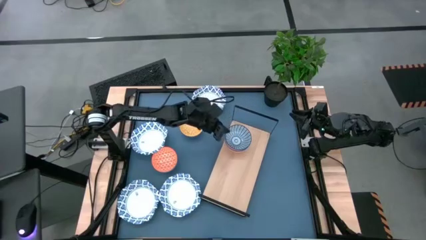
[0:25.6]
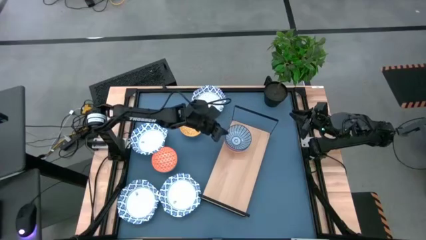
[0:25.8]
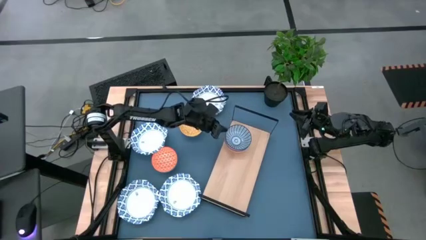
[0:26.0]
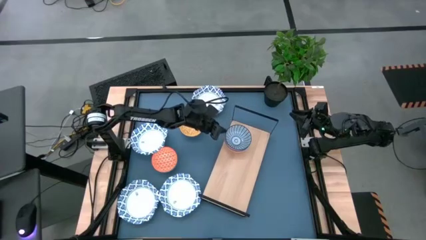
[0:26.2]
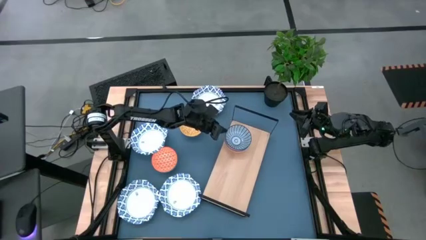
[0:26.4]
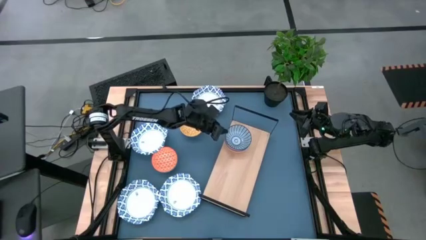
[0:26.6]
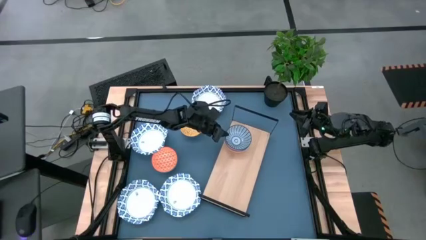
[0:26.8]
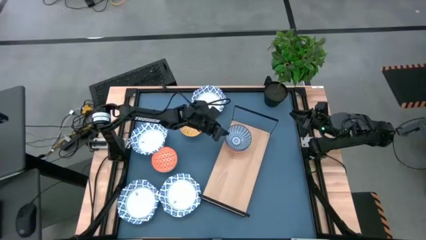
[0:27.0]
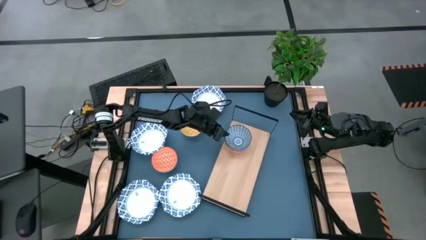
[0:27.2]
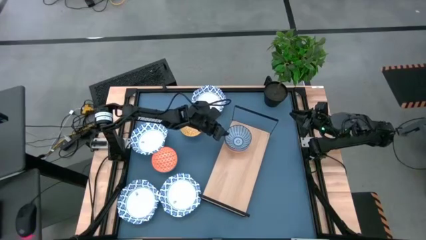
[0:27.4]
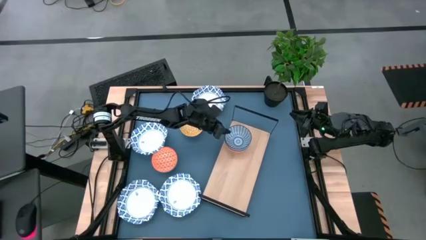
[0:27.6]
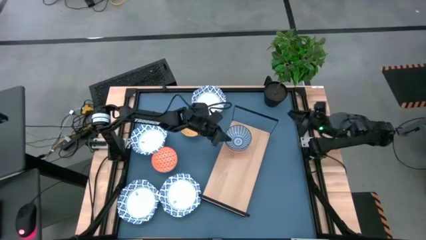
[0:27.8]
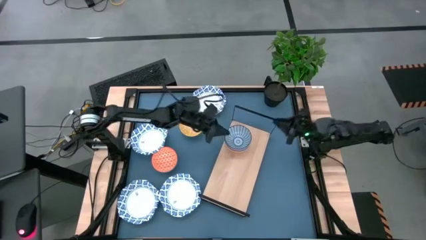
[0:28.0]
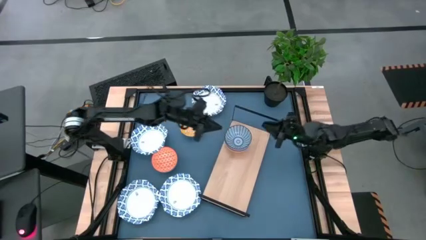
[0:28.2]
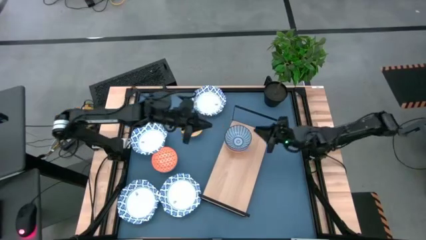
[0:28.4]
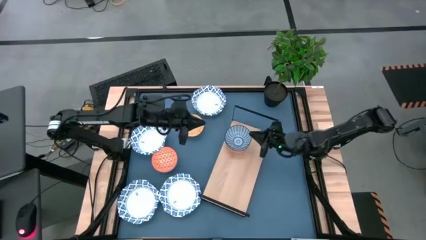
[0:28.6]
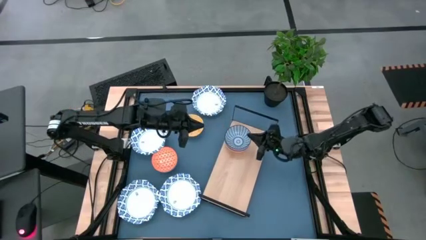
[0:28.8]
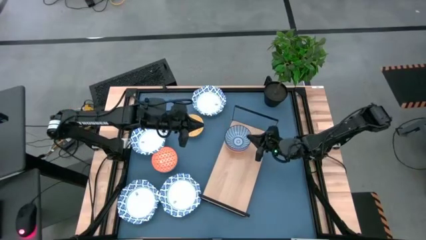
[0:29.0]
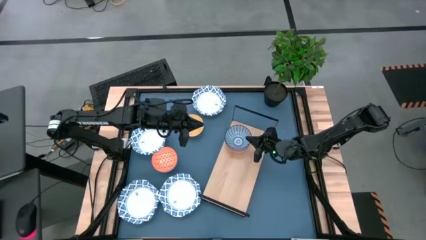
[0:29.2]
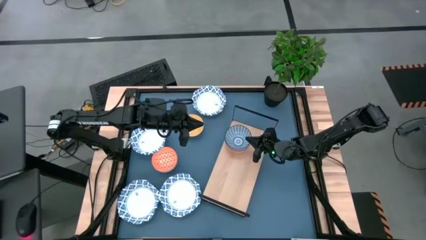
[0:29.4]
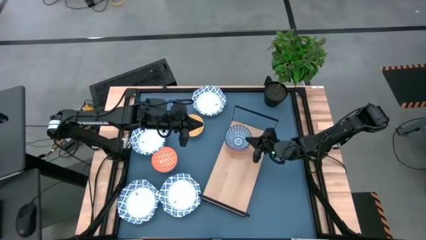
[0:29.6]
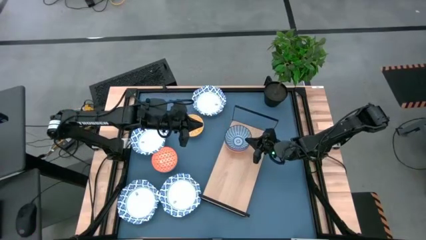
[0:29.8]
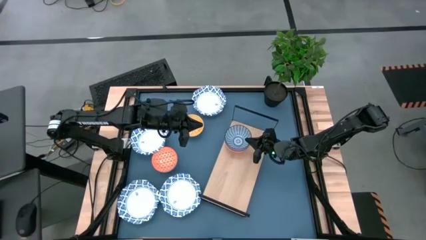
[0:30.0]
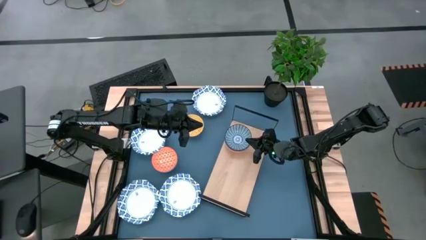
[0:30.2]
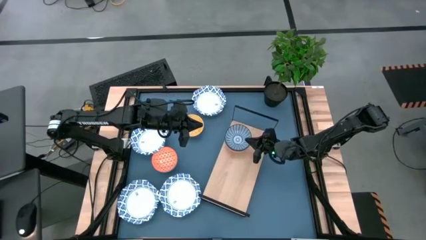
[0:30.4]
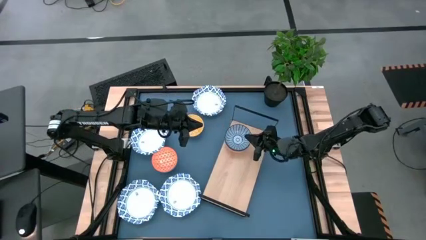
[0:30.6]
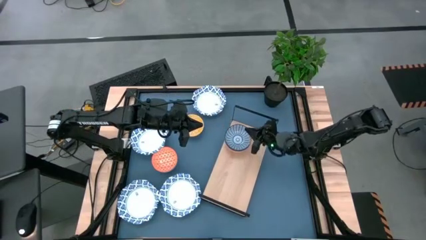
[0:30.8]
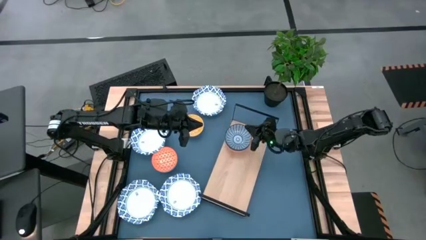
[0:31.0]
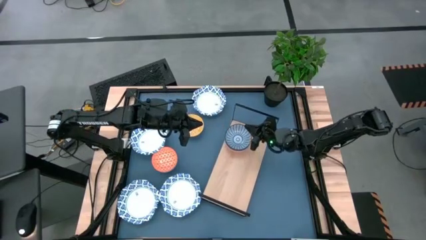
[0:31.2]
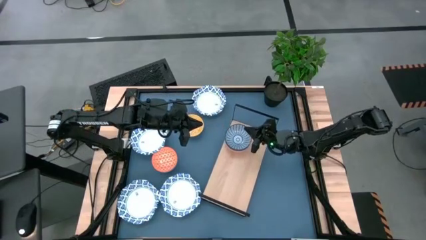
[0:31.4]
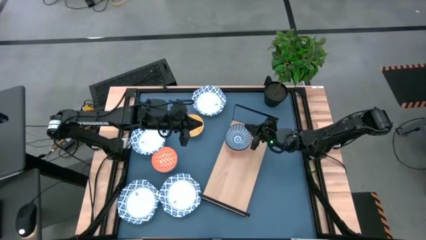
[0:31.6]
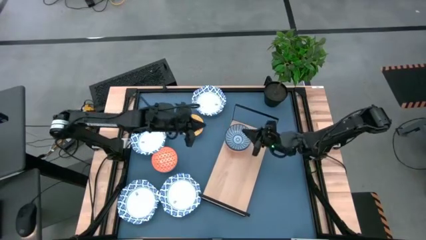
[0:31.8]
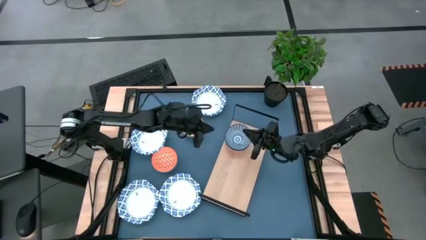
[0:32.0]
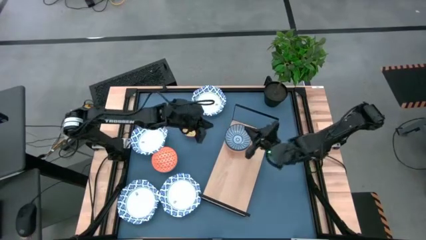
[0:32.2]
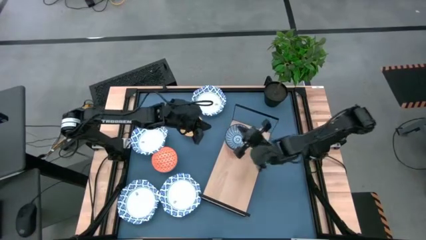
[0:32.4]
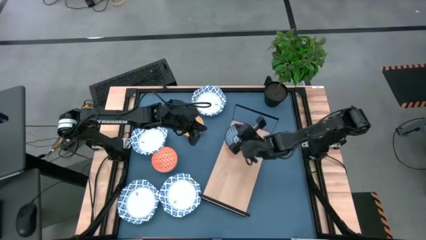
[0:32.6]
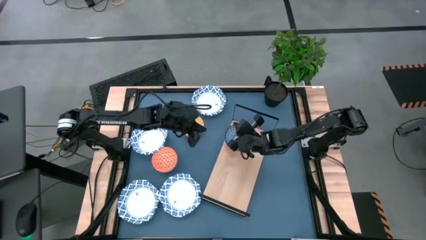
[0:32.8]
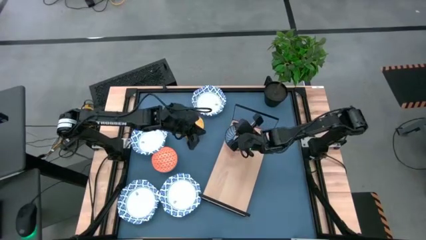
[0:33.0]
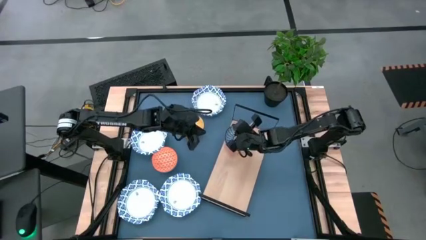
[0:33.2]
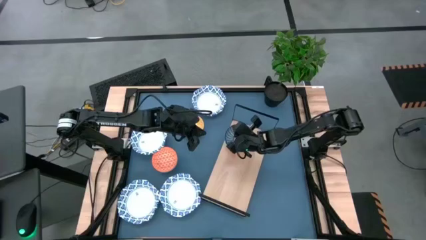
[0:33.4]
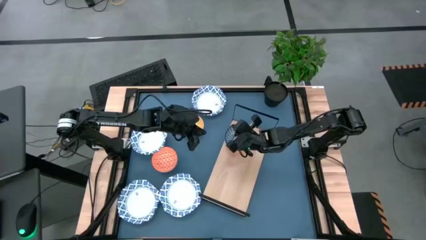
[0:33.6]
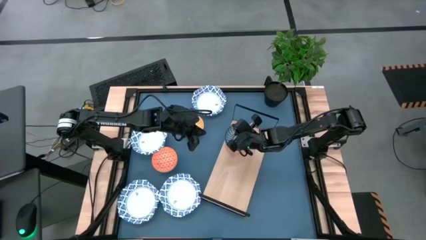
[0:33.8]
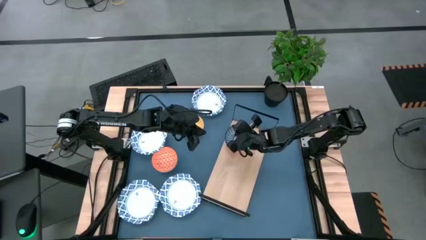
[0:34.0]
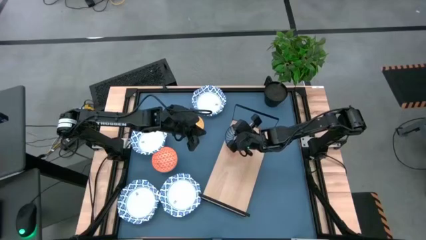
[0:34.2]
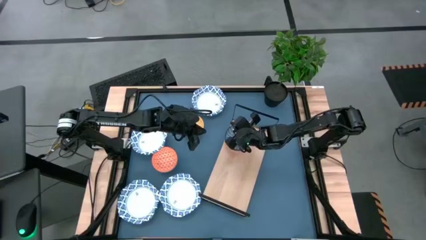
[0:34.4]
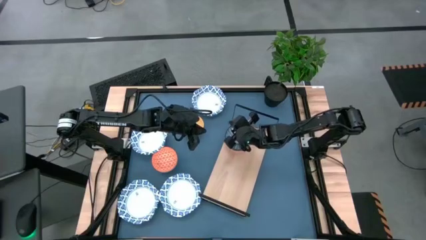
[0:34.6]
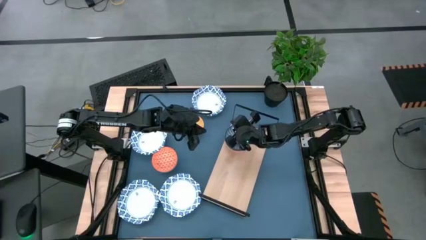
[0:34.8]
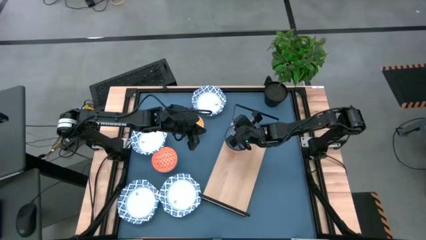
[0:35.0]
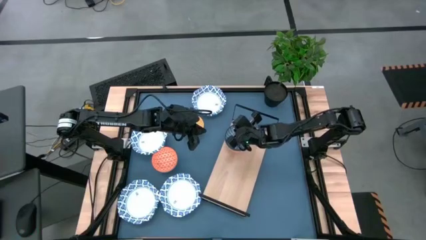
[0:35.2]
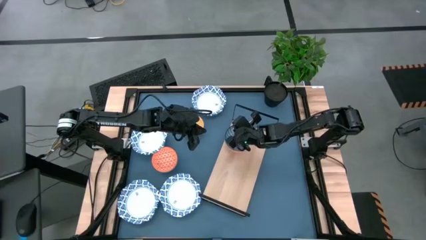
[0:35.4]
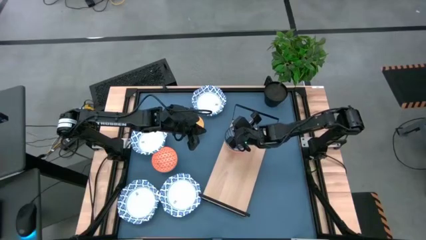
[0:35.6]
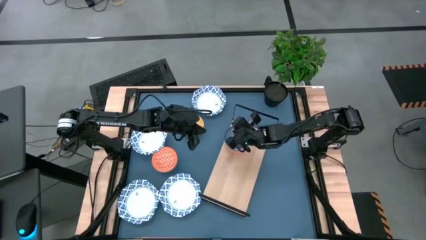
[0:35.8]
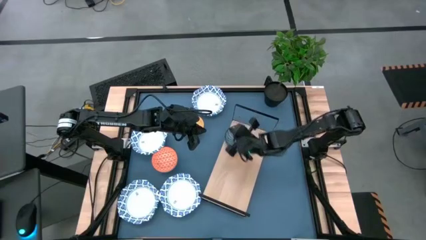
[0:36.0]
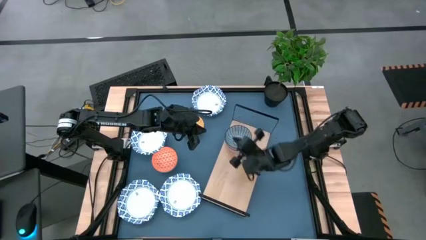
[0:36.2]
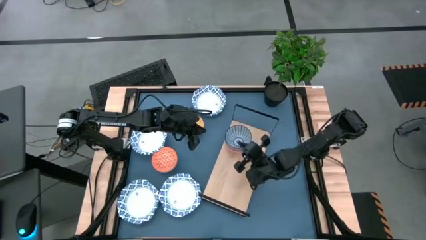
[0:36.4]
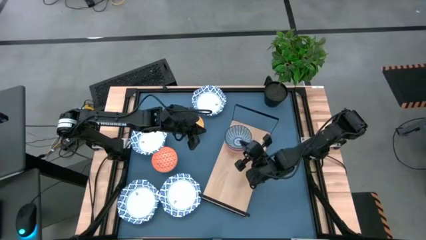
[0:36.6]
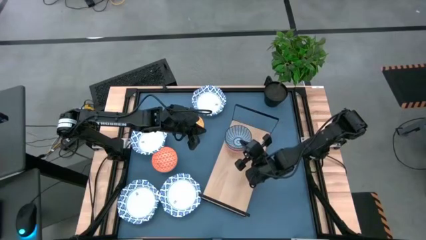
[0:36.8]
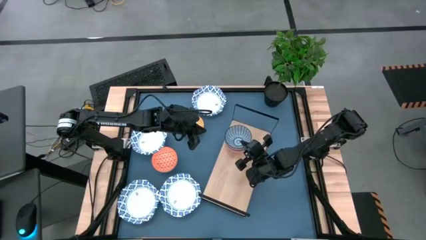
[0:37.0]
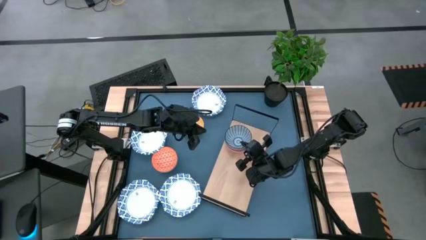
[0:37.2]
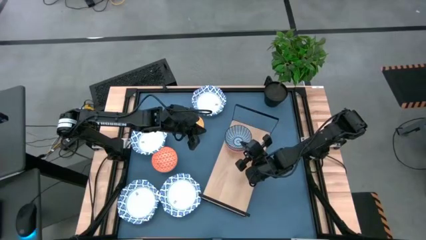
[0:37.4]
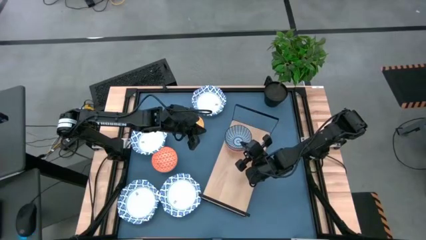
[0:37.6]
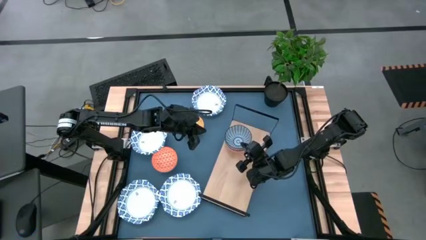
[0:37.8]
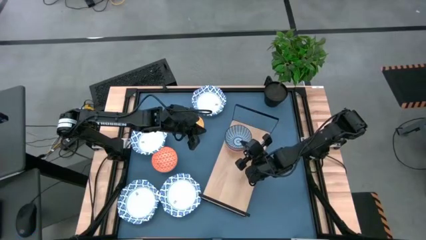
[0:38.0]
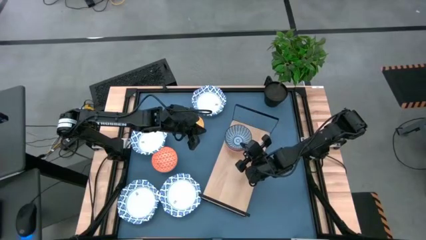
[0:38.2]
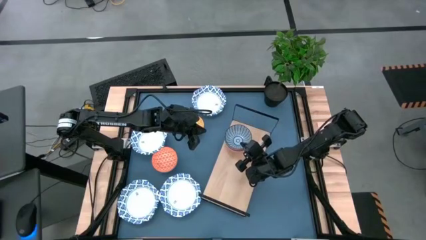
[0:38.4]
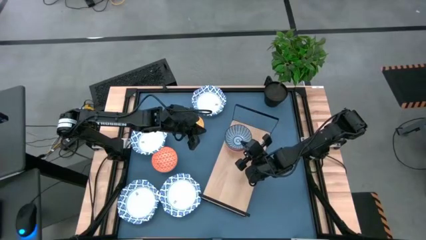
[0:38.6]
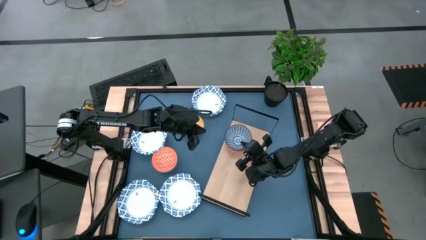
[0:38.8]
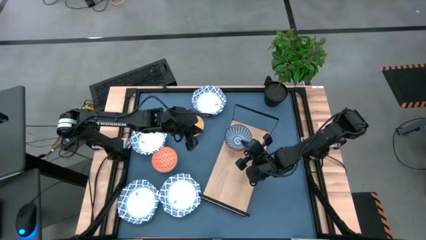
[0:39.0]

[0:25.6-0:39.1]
Task: Place and stack bowls onto a shelf
Stack the dark blue striped bowl into the light blue patterned bowl

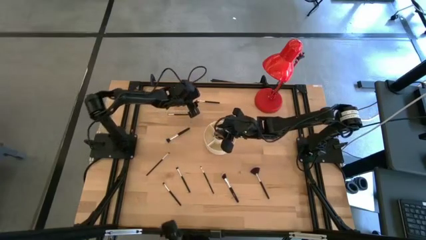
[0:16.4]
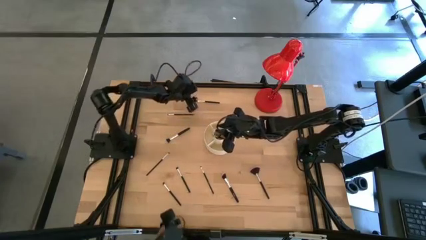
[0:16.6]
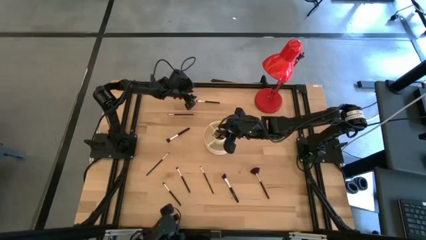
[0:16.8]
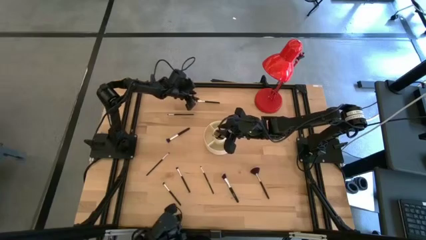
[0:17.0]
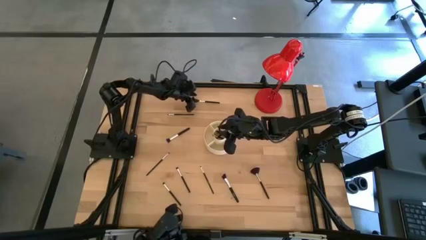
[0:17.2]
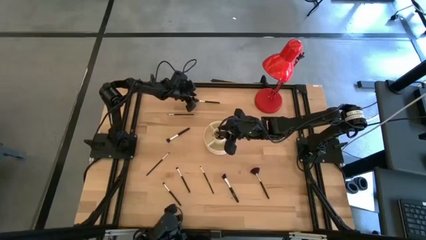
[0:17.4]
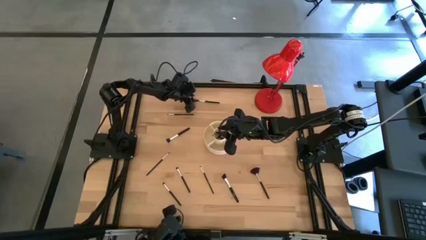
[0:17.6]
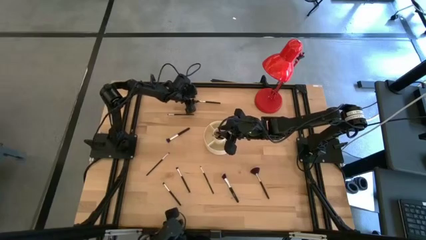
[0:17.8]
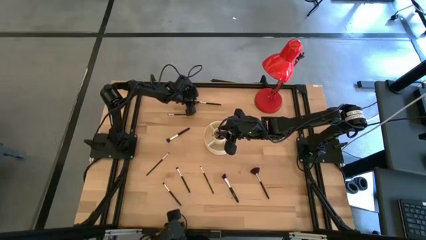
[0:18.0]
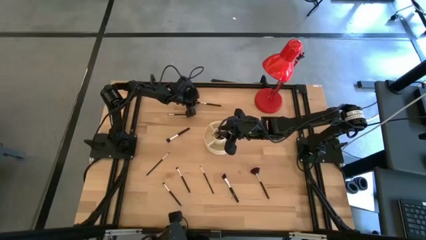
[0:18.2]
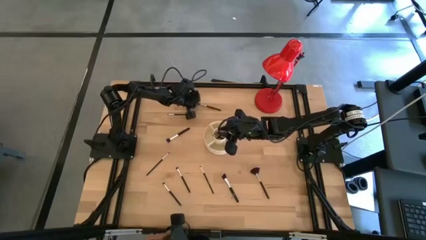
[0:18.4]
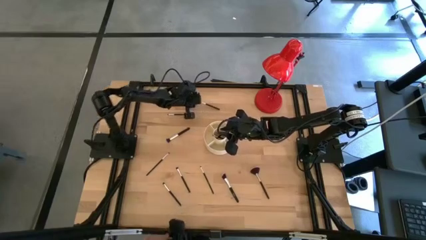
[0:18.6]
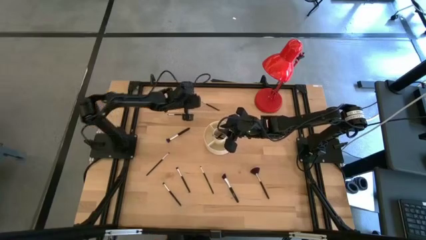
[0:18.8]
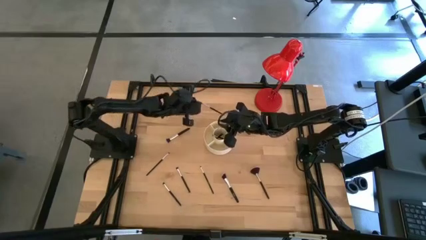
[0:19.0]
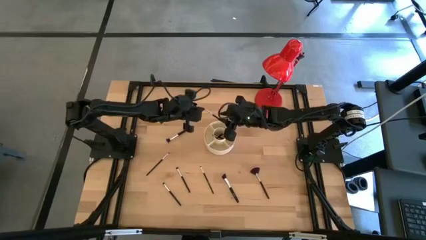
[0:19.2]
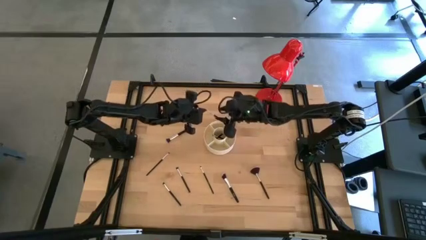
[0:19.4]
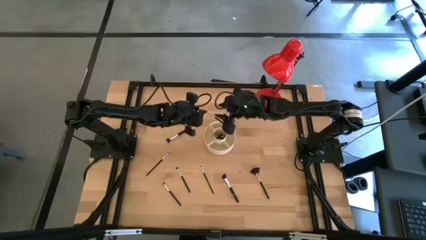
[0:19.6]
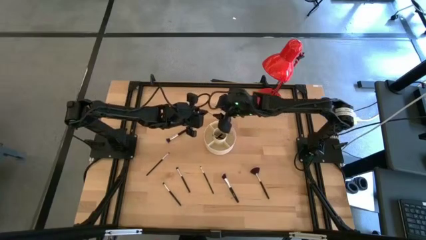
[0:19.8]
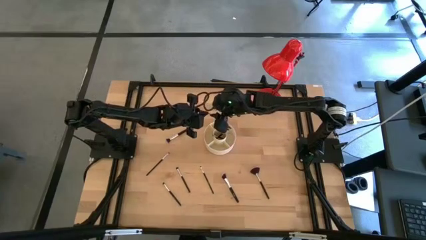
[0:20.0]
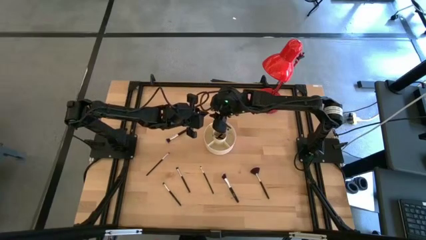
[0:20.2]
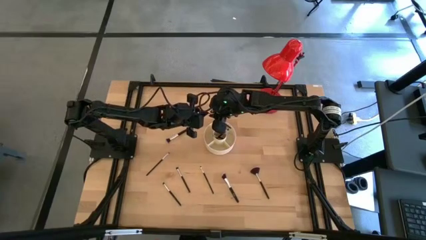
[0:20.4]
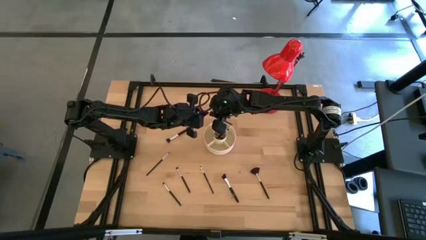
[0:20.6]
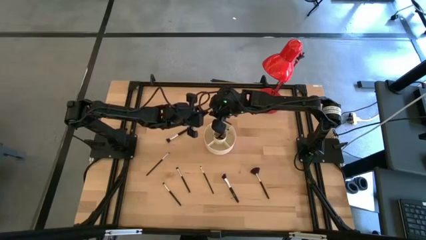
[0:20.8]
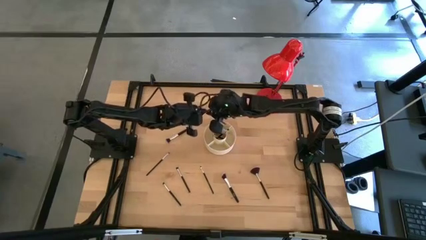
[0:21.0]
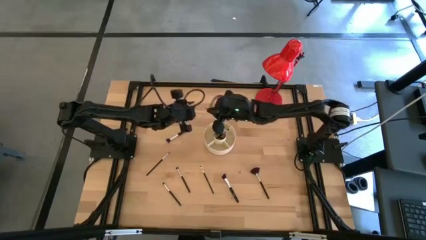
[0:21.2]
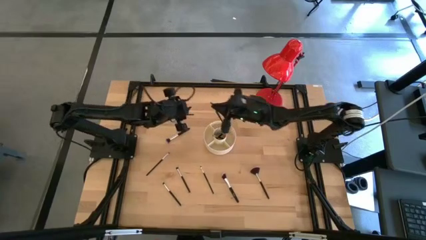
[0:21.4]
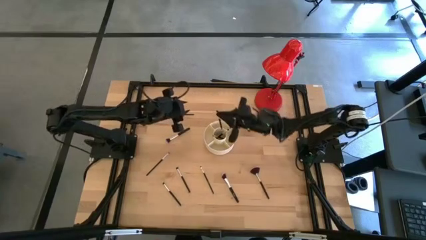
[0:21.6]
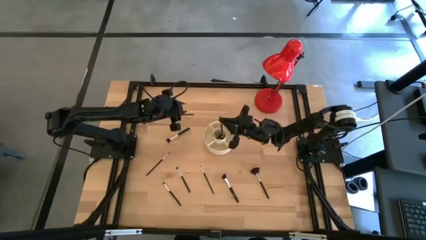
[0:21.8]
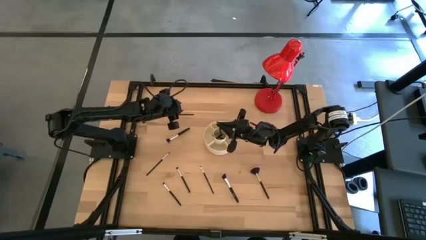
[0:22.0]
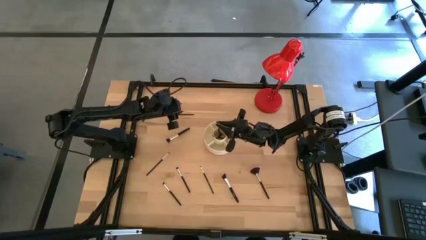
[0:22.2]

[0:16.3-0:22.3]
Task: Put items in baskets/containers
Put the eyeshadow brush into the brush organizer
